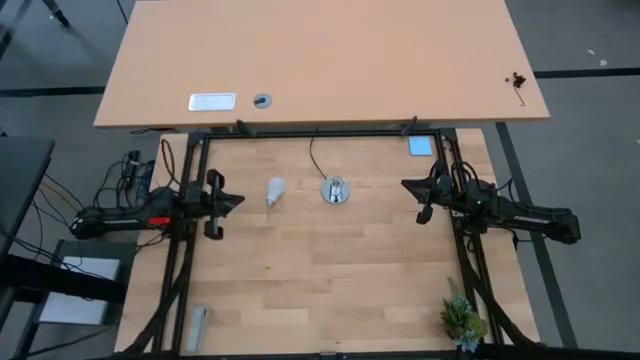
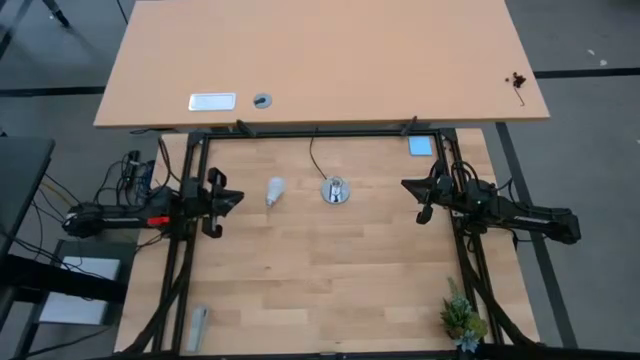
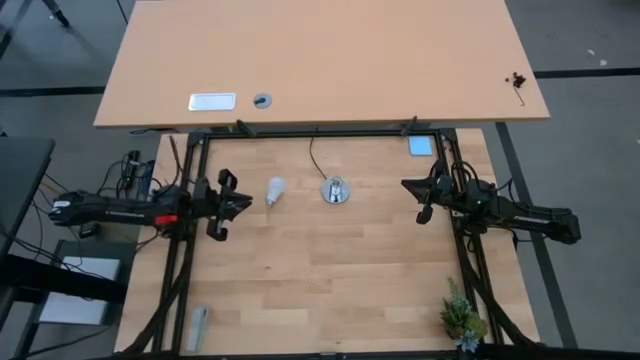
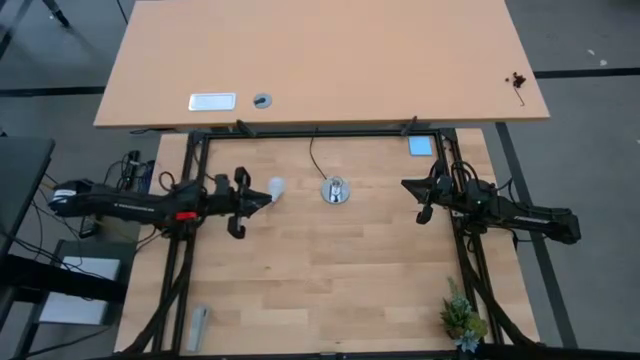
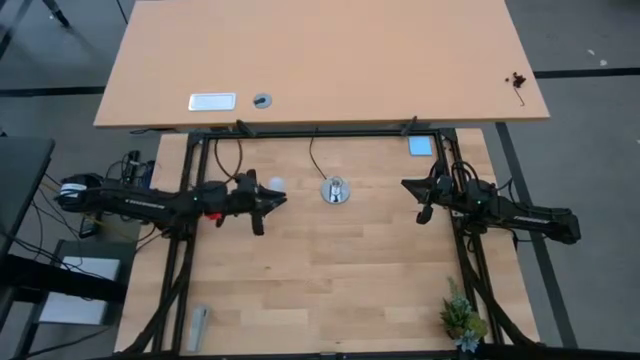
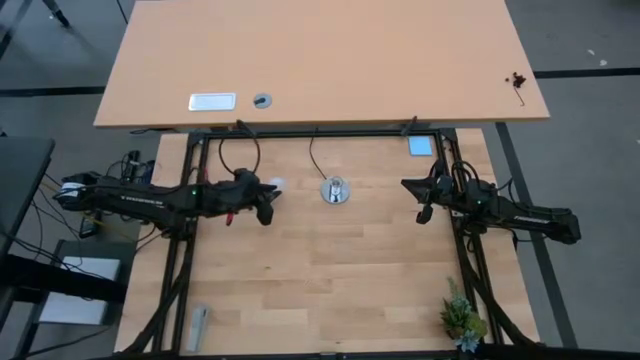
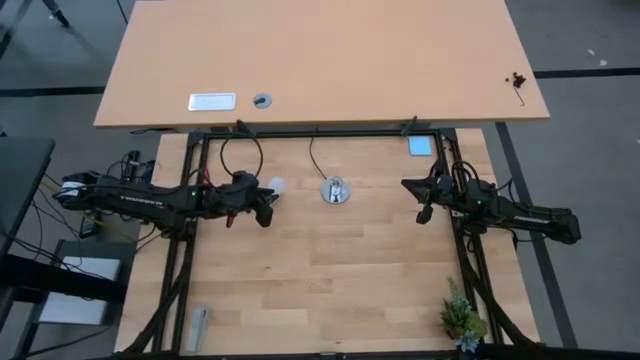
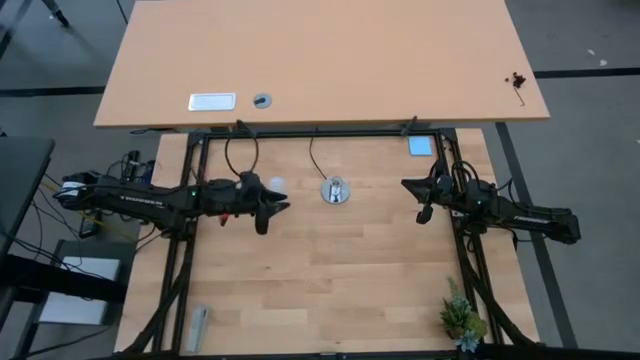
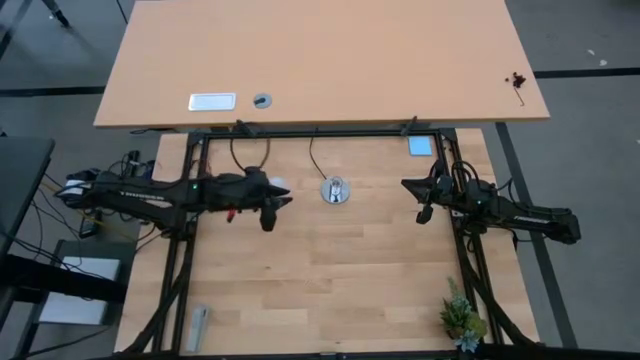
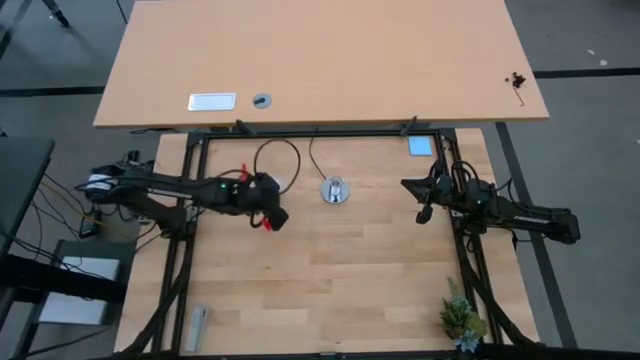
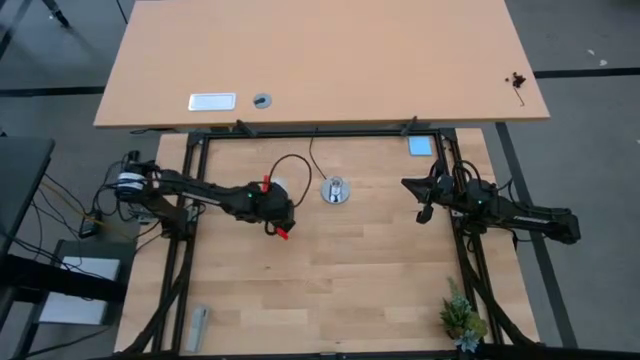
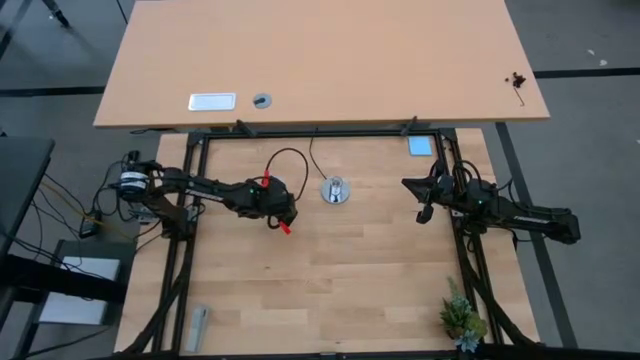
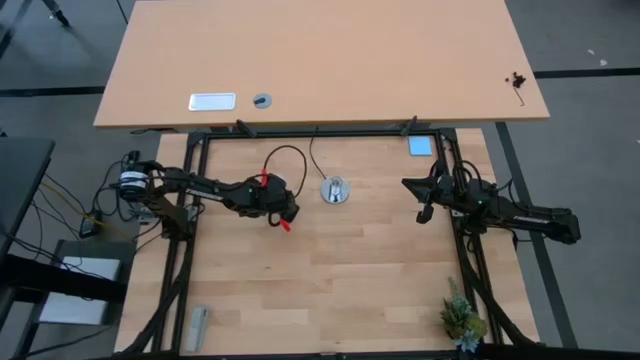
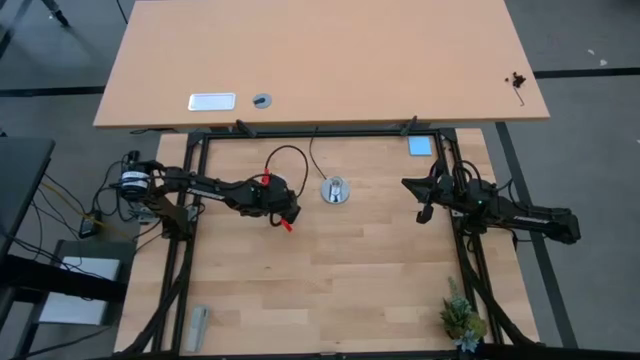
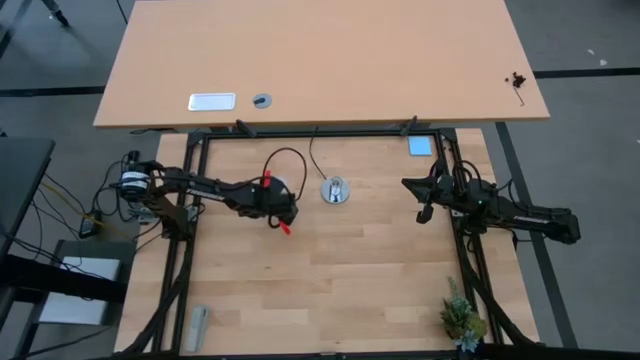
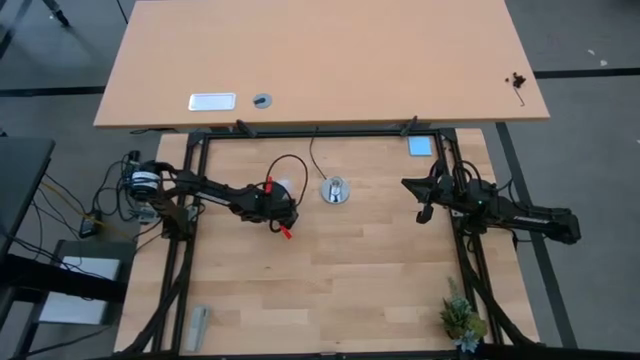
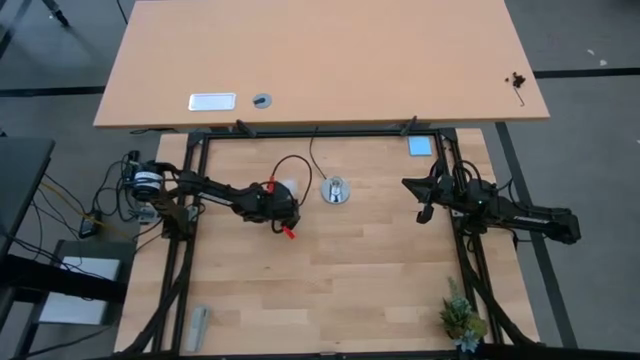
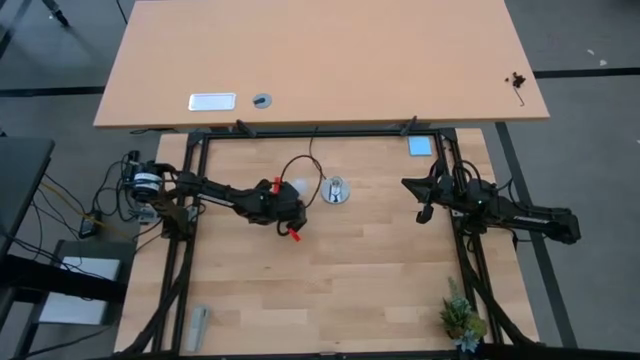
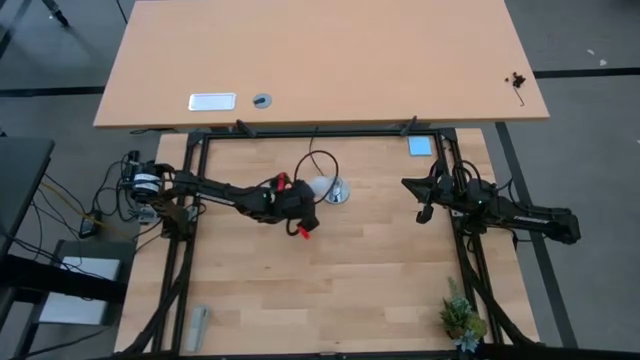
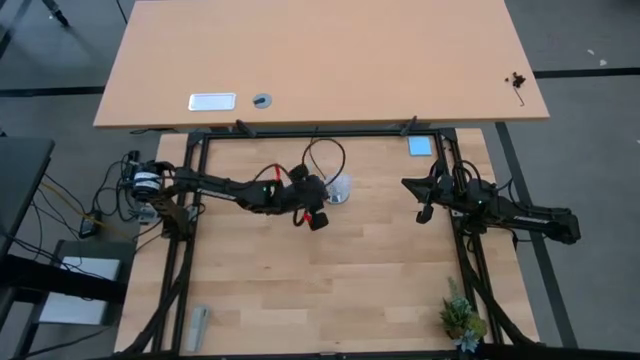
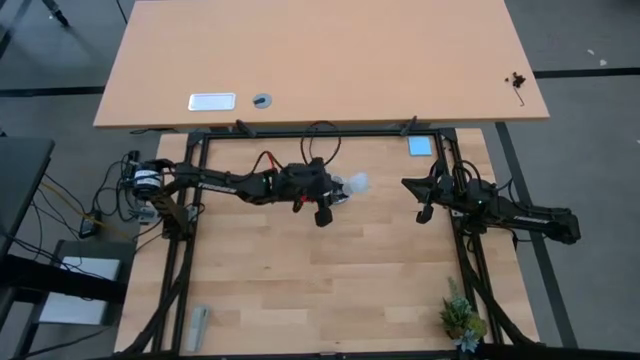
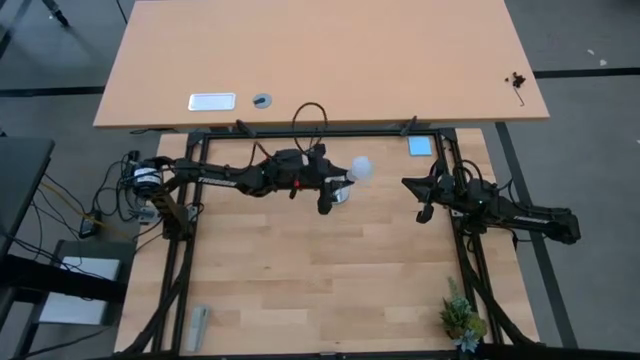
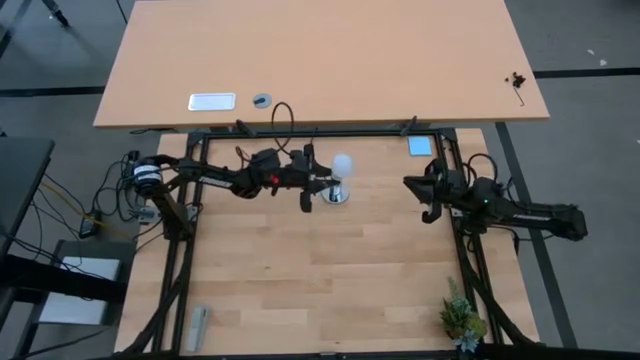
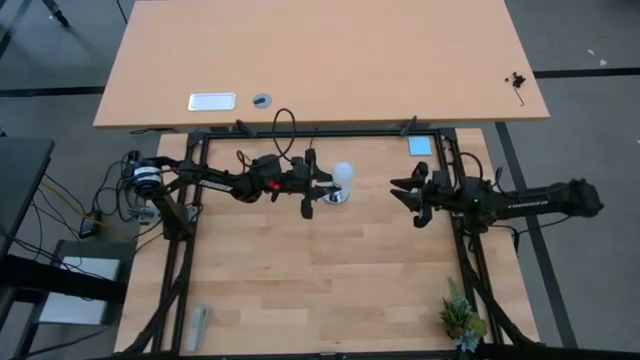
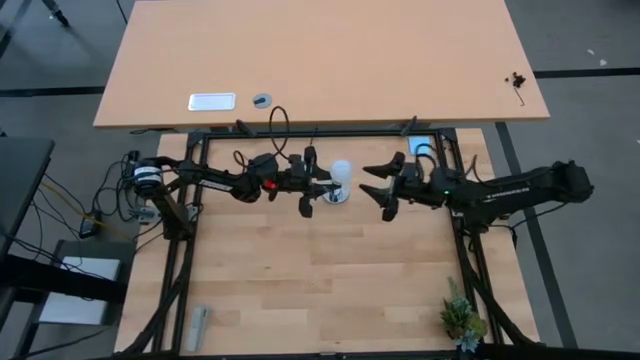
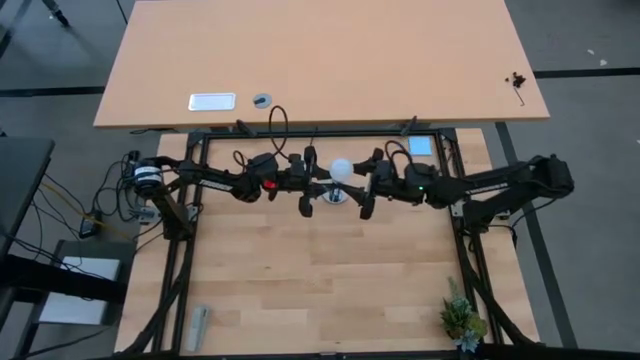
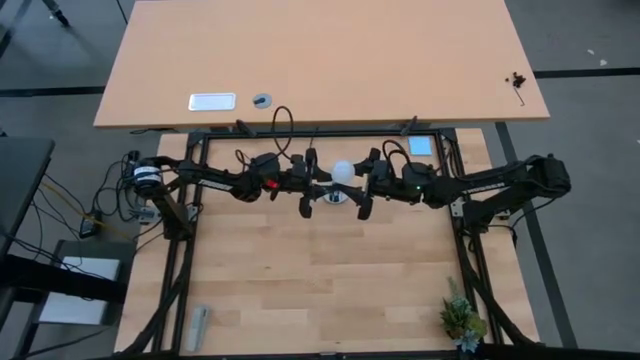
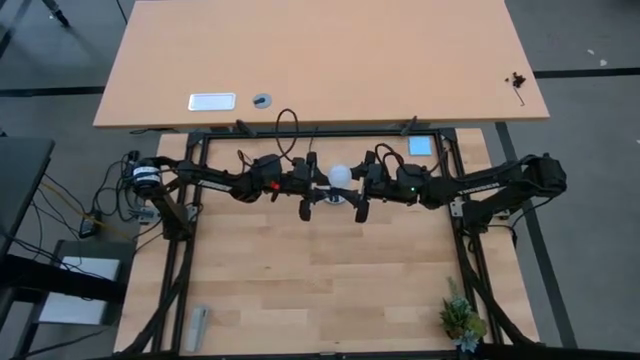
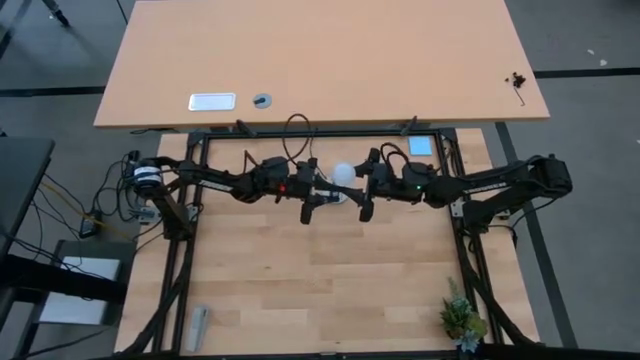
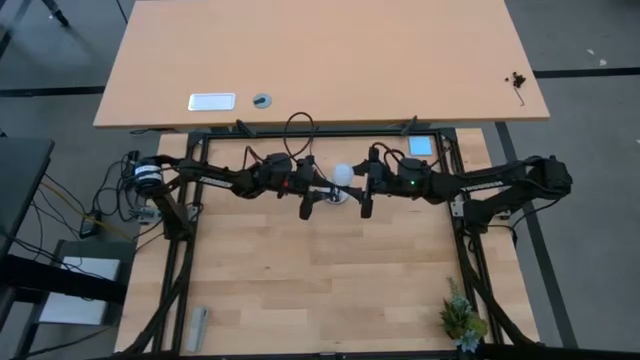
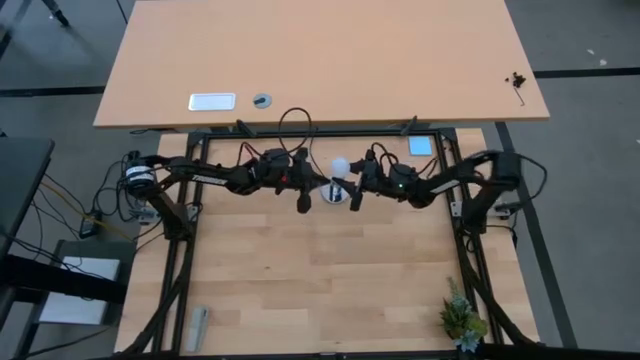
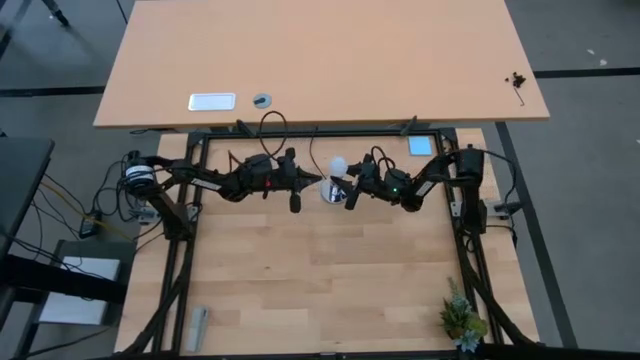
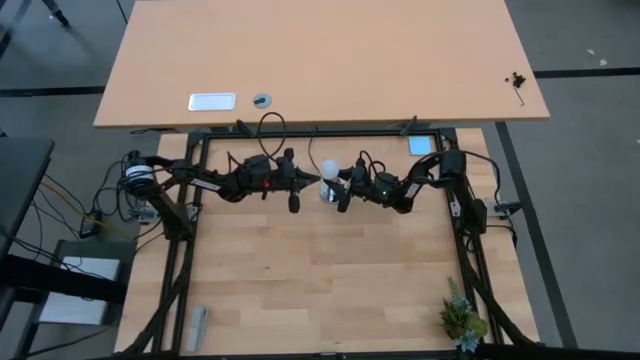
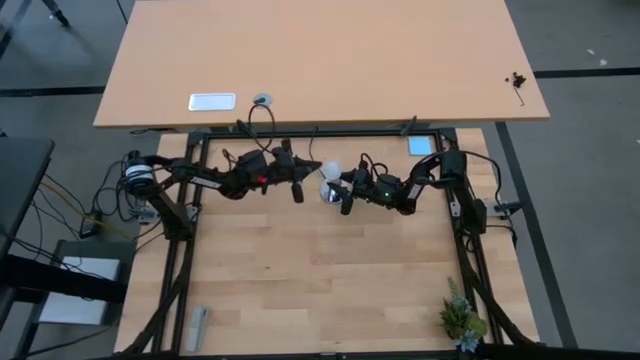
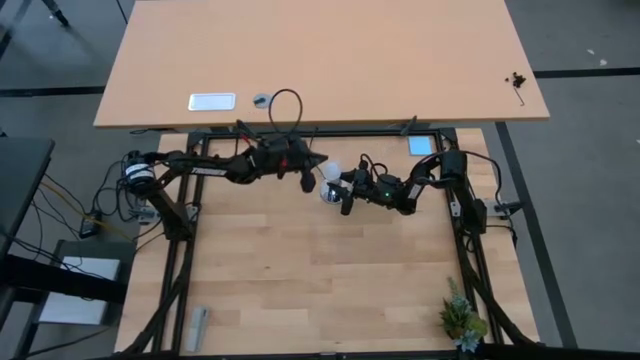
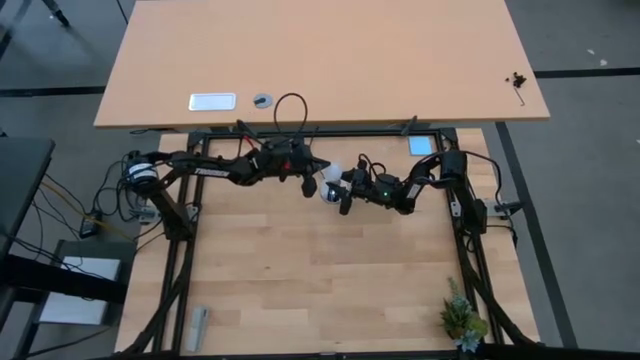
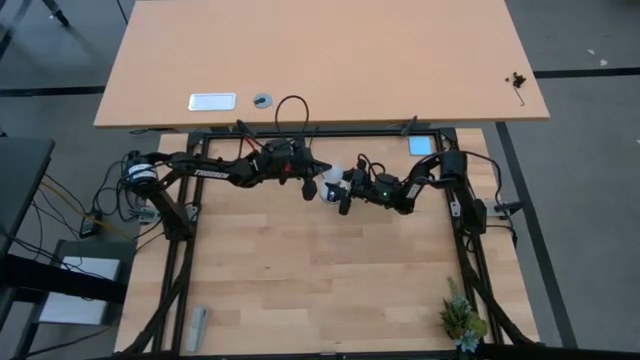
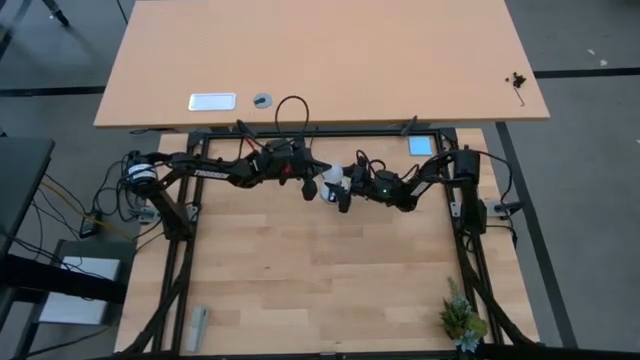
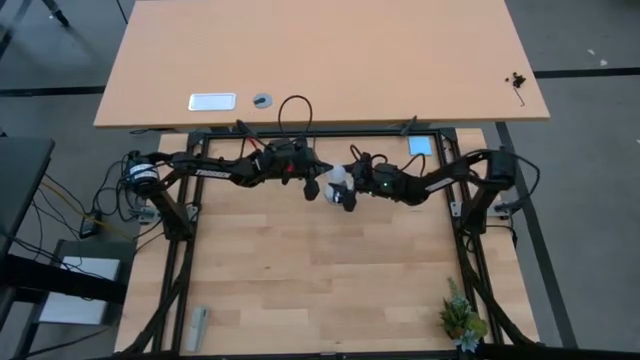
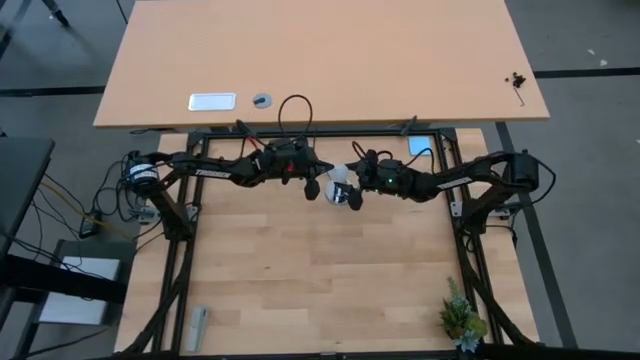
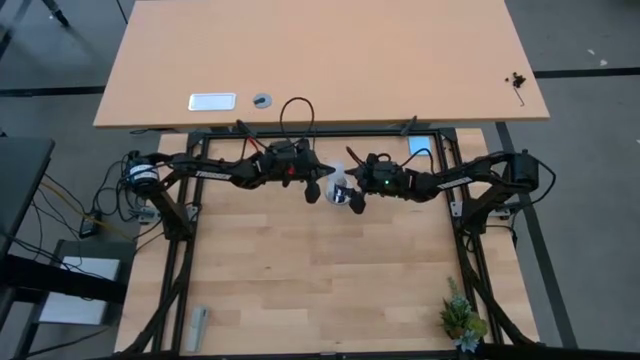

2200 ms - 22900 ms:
Task: Screw lightbulb
Insert the lightbulb into the lamp
